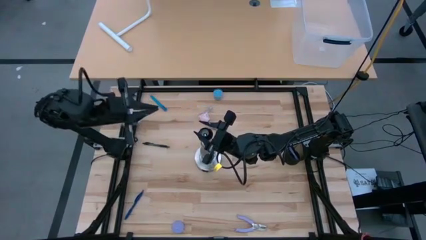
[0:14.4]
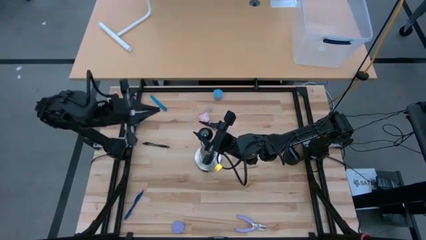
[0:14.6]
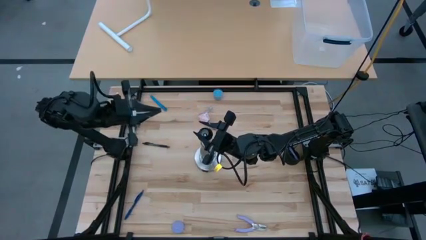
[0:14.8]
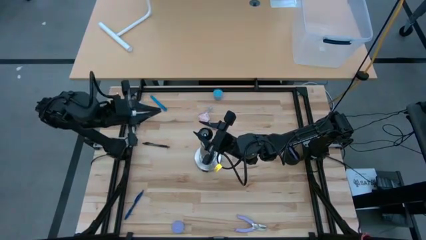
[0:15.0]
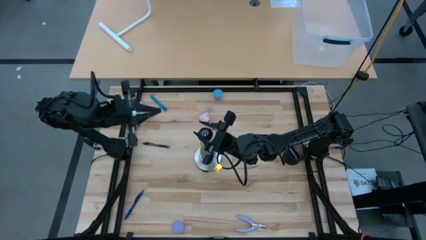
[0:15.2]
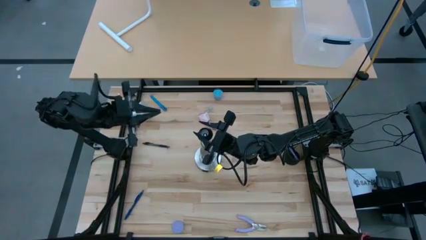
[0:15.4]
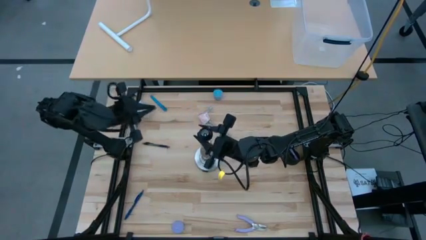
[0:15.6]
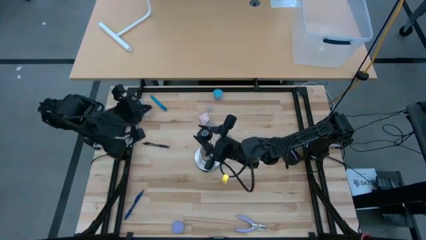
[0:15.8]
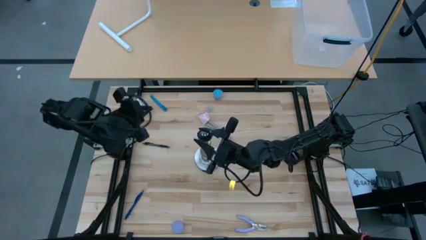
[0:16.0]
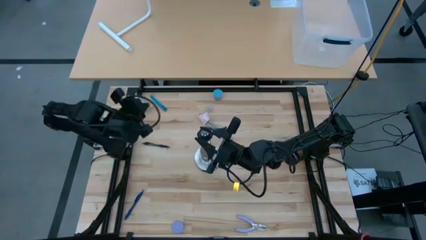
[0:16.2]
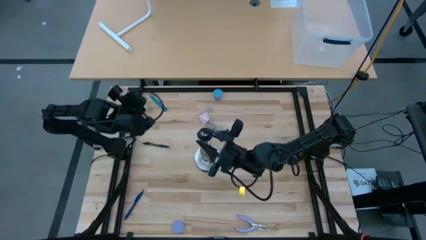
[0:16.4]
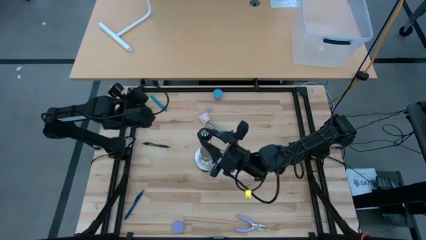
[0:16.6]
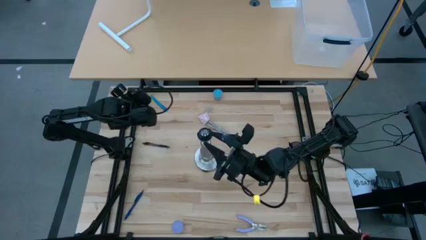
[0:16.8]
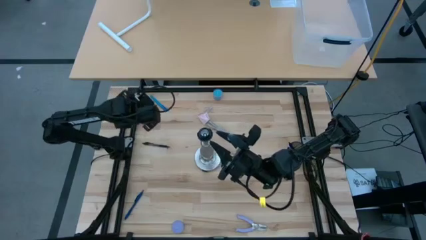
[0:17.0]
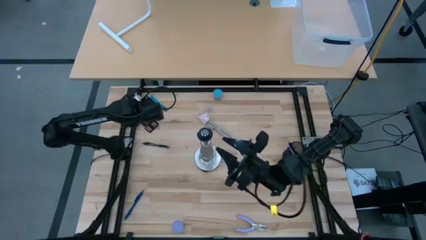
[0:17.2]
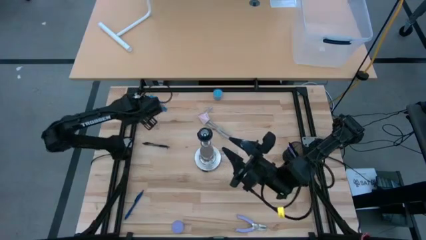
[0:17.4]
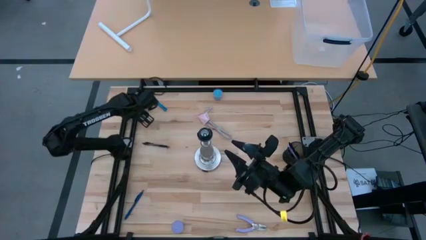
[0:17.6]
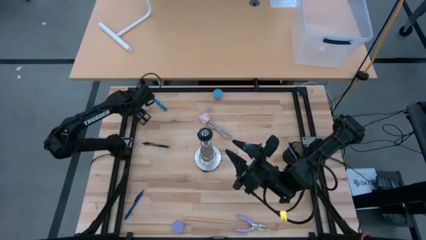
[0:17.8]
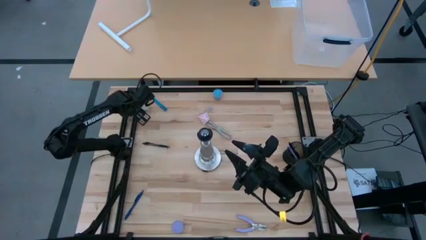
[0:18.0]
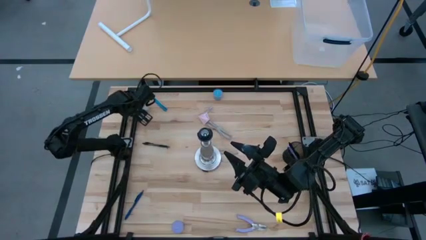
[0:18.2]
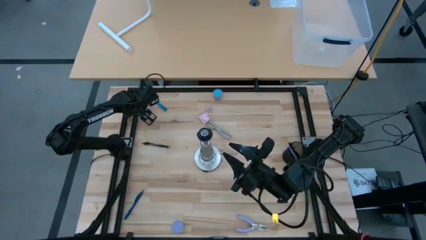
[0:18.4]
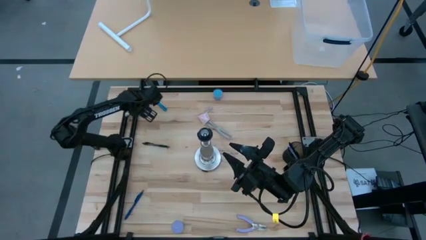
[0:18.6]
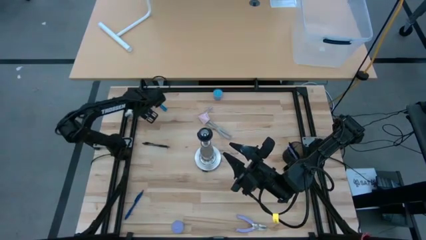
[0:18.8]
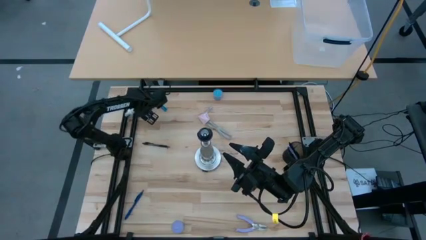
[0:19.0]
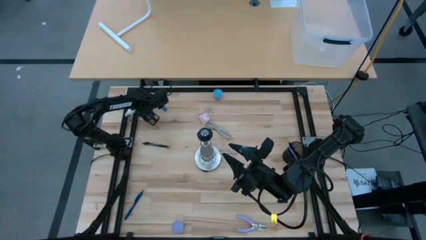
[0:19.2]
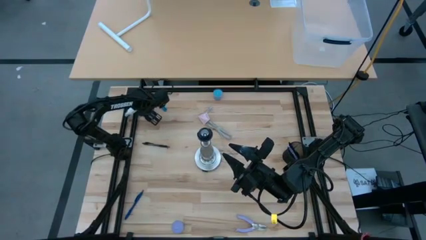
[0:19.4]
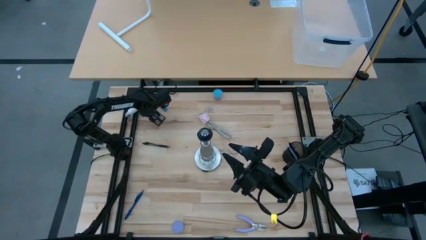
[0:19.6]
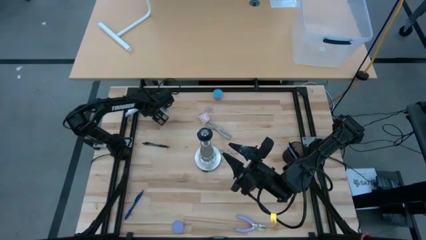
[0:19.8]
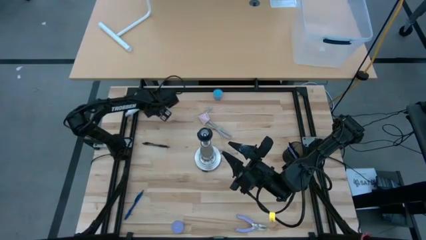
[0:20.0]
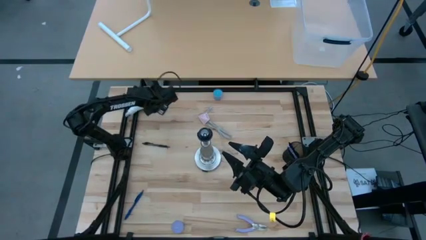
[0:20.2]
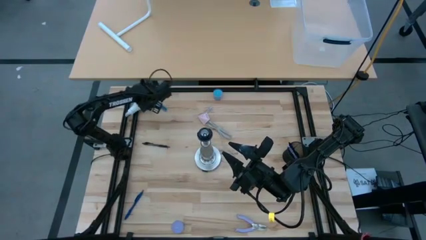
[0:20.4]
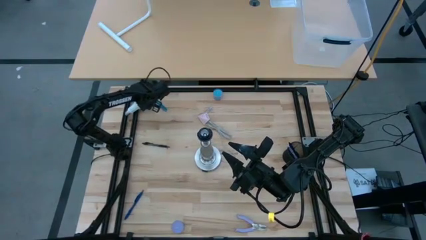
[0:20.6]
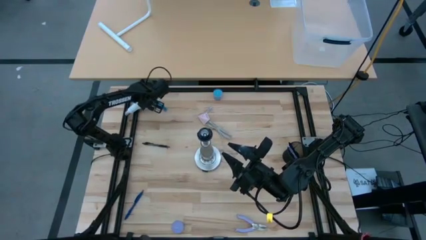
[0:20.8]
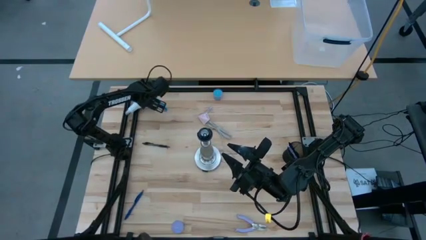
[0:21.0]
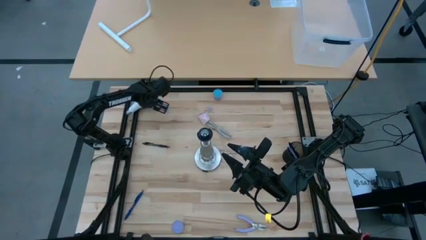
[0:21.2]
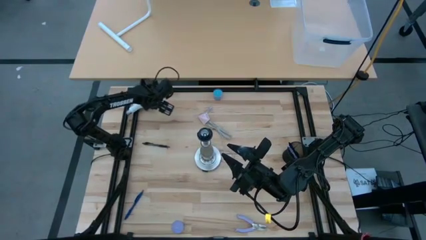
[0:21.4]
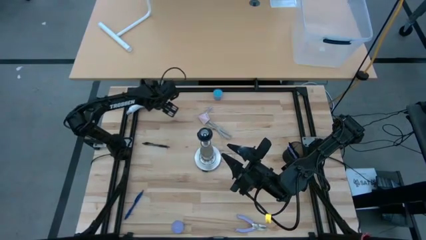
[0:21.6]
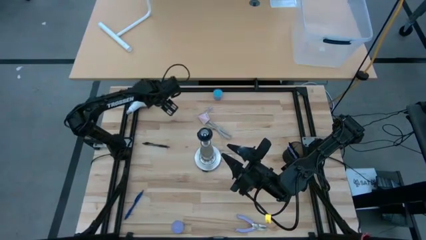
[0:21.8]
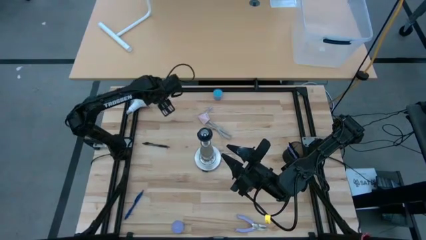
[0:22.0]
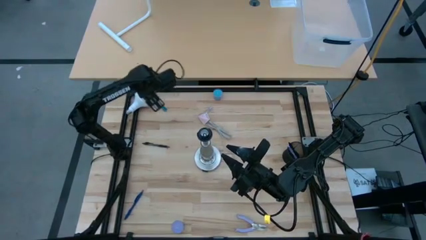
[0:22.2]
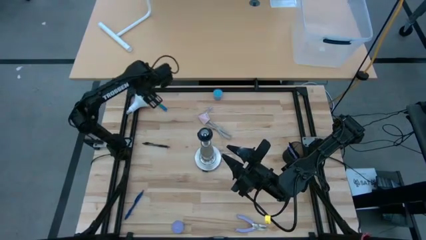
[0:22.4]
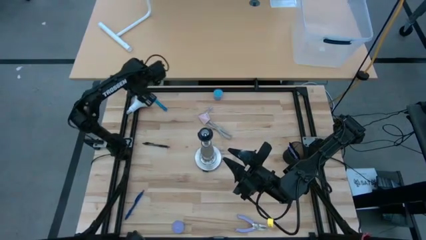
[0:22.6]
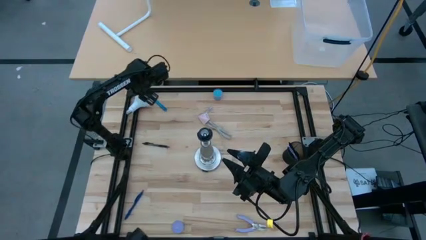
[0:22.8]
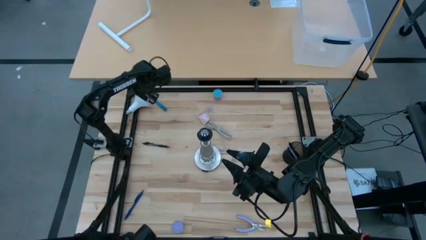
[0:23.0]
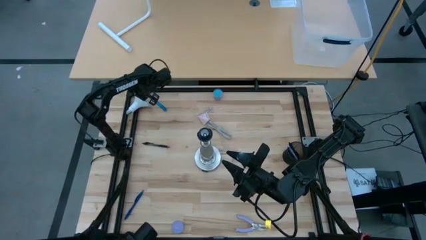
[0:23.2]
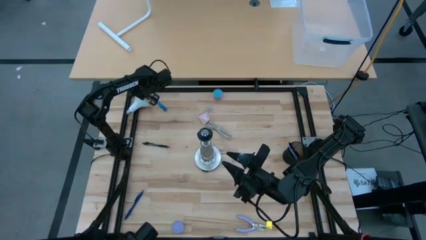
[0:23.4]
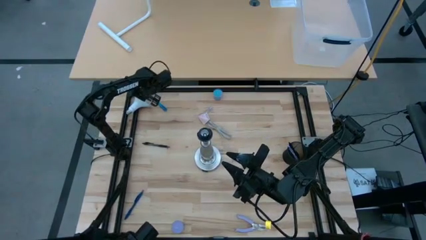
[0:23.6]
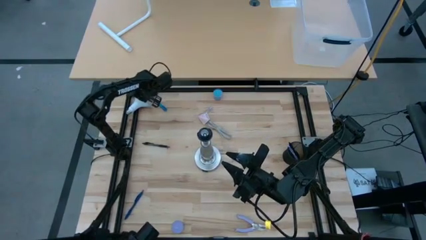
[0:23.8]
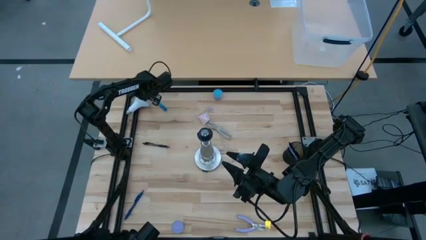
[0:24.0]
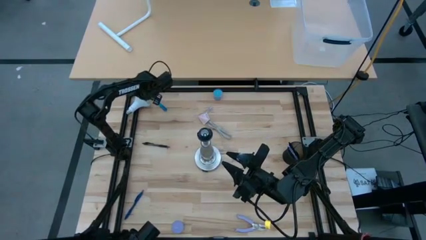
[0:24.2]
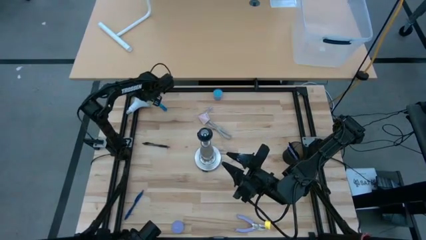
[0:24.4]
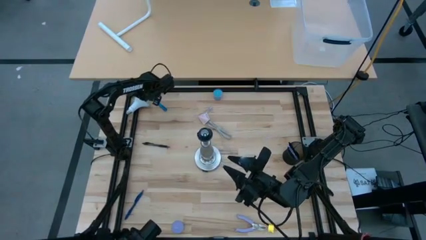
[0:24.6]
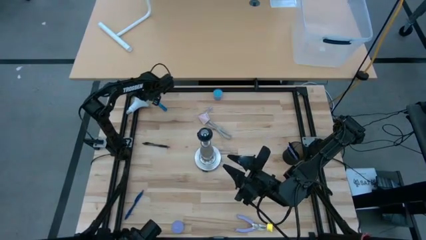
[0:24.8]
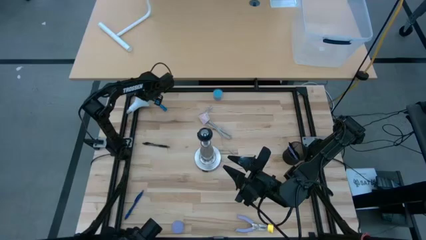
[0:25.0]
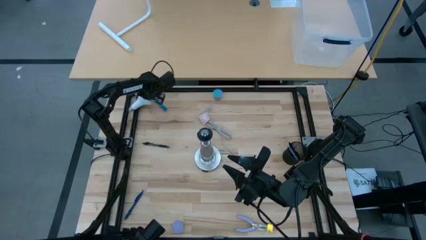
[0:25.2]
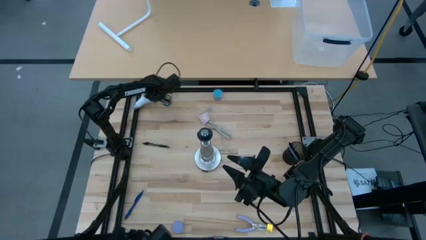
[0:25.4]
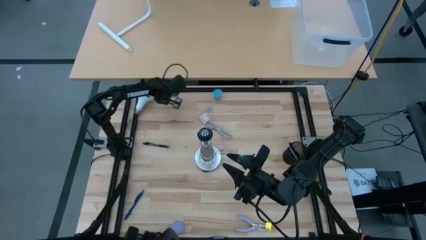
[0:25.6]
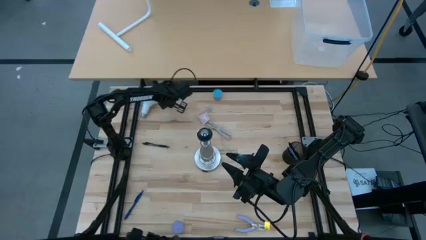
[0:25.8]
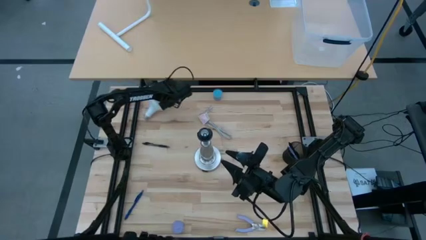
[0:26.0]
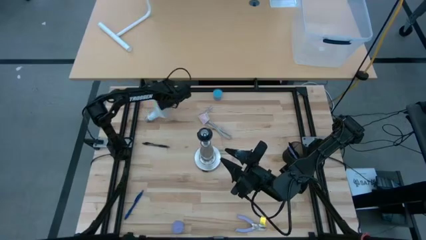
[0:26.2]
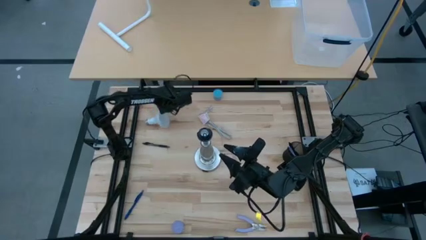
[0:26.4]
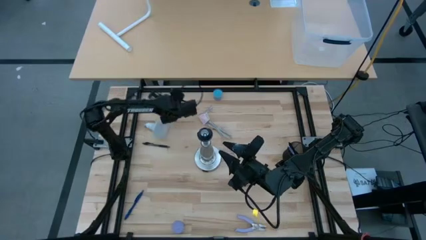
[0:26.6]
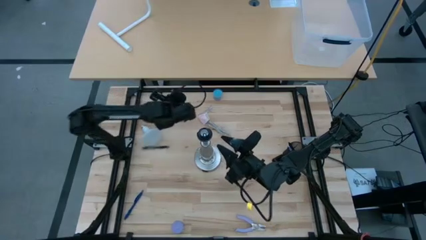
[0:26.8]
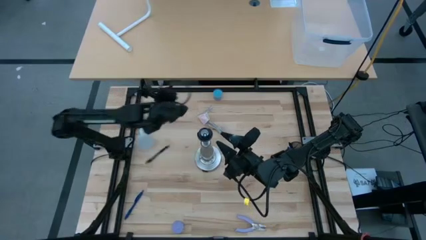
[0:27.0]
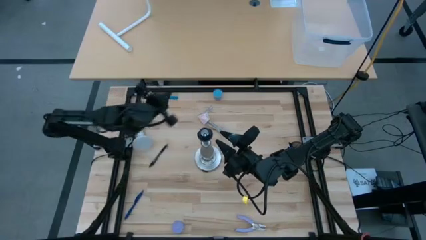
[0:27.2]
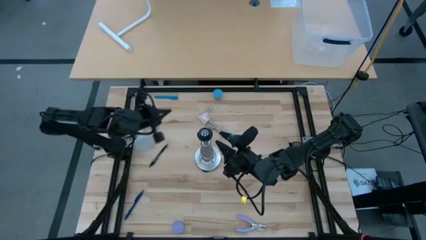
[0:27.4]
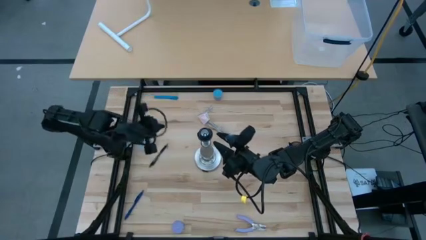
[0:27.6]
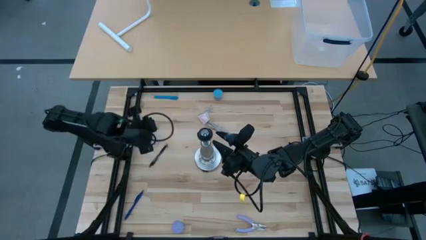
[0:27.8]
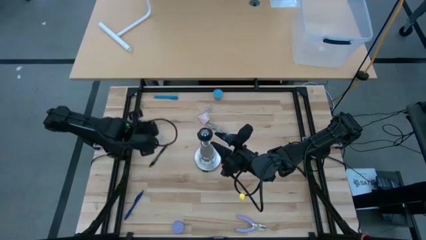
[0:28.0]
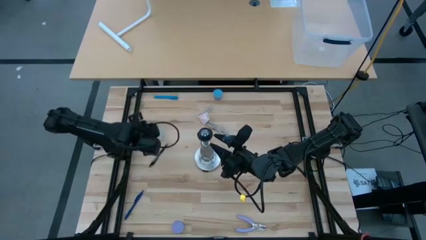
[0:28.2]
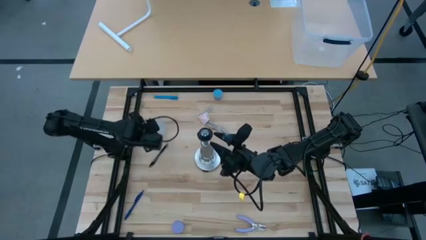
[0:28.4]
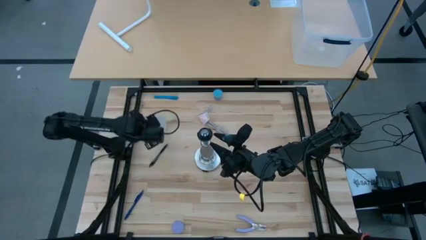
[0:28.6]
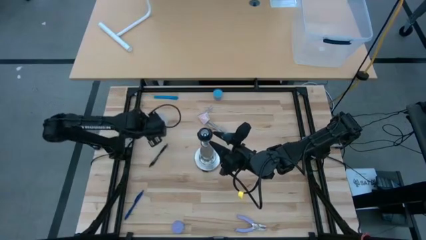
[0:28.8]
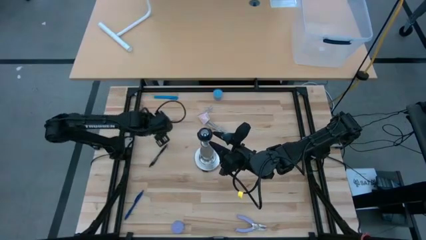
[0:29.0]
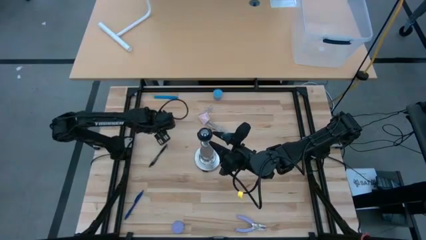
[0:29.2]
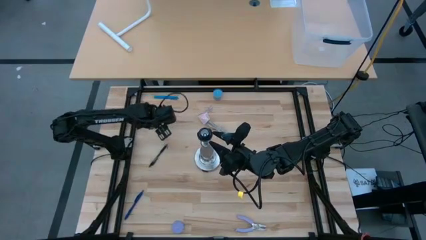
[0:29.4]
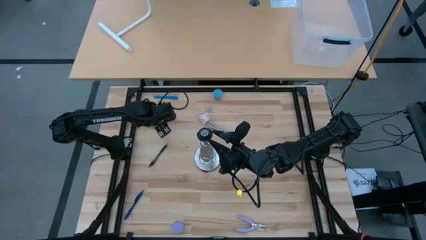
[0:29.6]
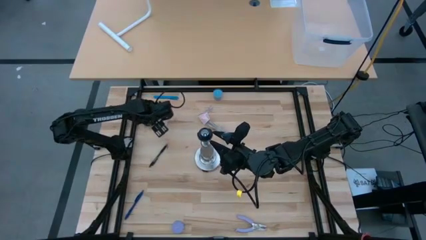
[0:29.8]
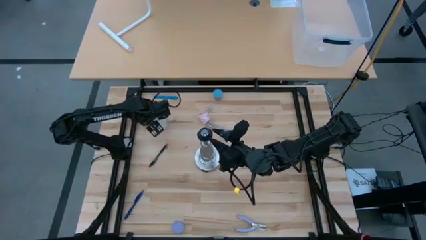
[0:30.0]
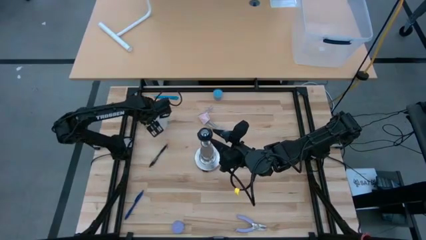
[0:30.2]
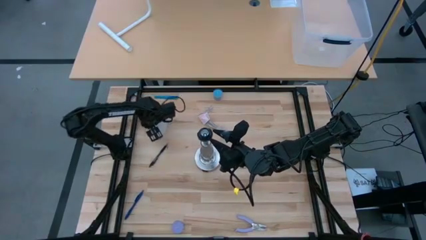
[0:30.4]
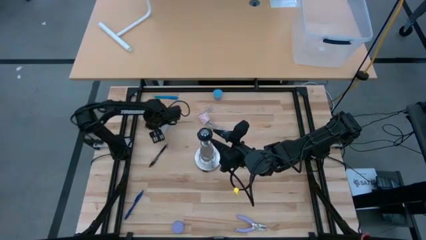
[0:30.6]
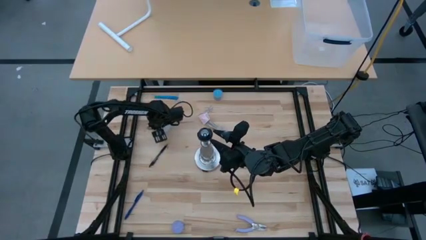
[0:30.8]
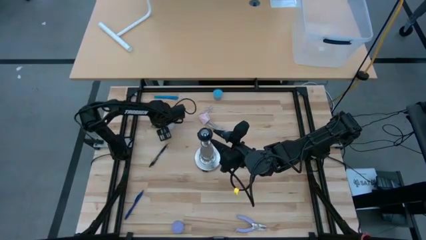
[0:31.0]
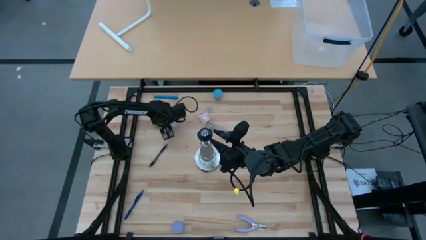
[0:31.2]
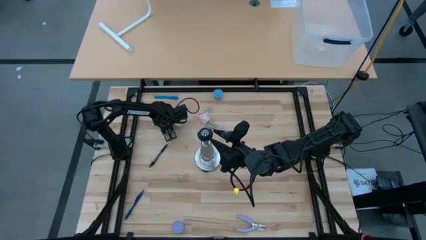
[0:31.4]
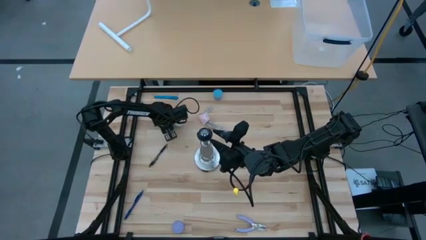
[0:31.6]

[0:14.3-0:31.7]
Task: Screw lightbulb
Insert the lightbulb into the lamp
